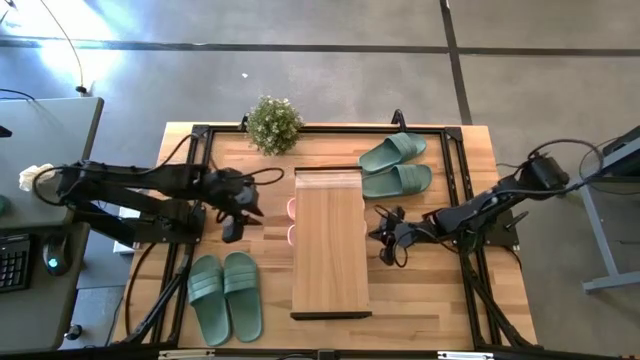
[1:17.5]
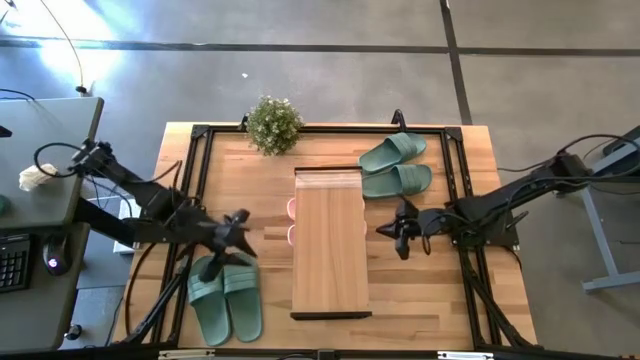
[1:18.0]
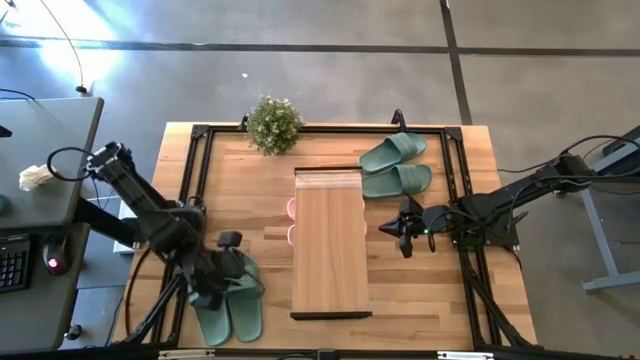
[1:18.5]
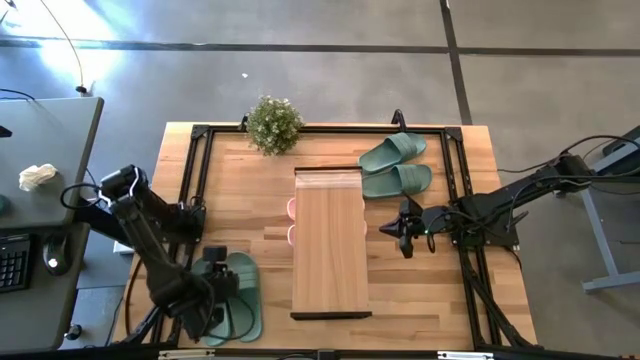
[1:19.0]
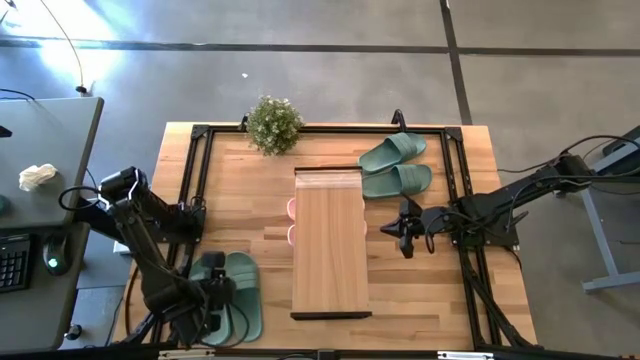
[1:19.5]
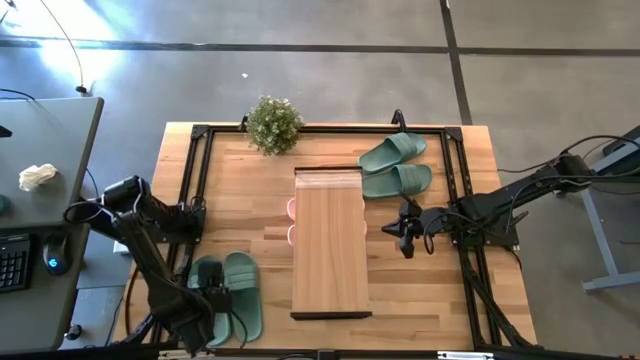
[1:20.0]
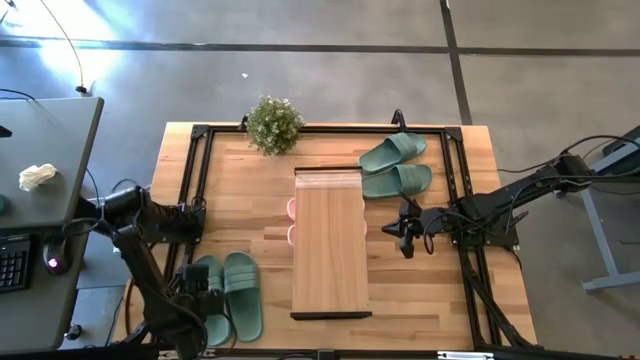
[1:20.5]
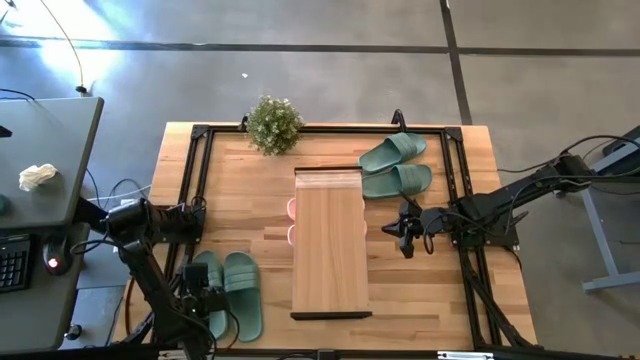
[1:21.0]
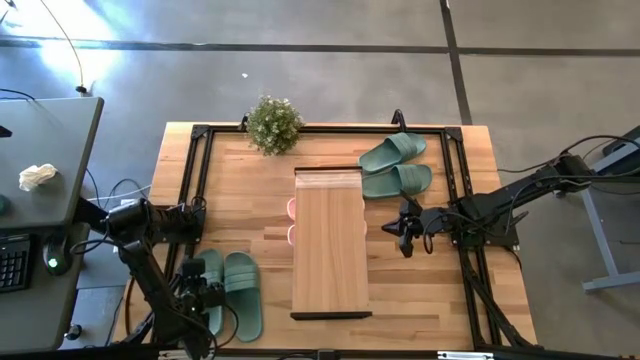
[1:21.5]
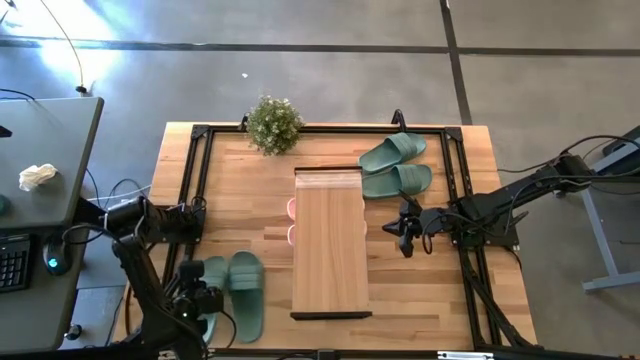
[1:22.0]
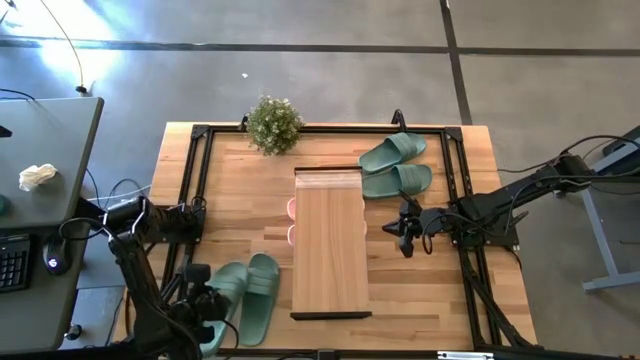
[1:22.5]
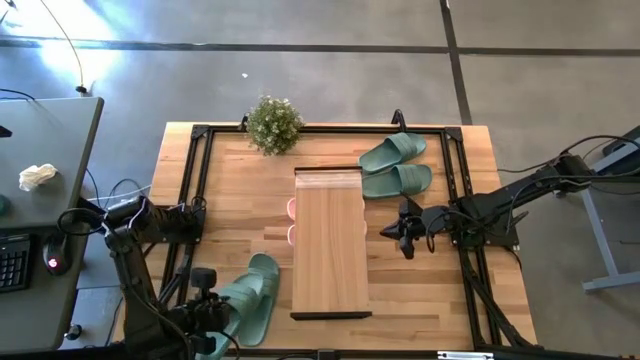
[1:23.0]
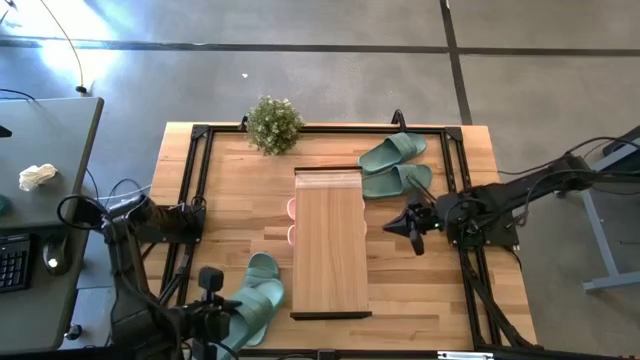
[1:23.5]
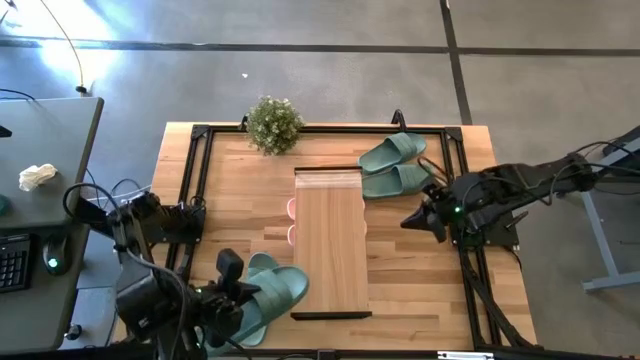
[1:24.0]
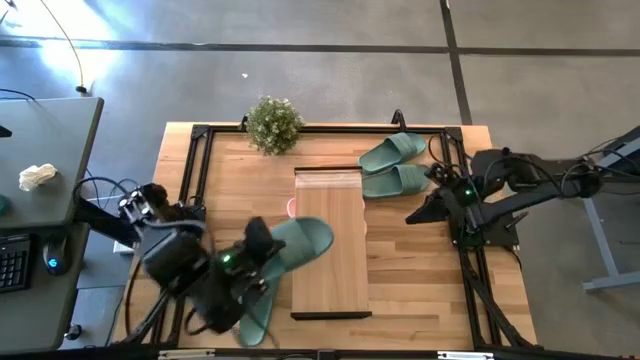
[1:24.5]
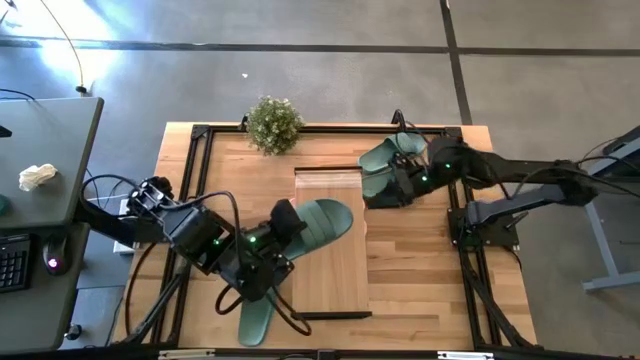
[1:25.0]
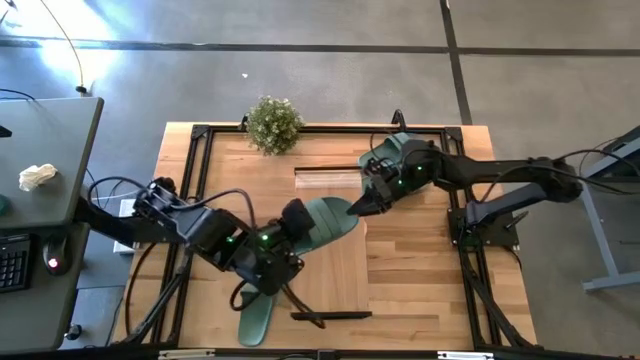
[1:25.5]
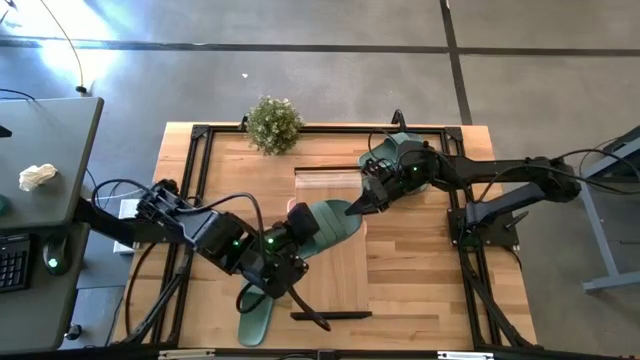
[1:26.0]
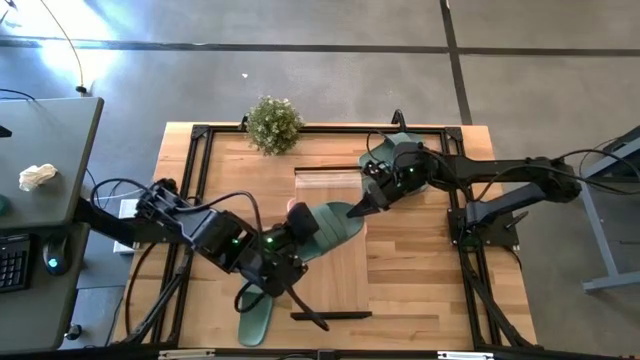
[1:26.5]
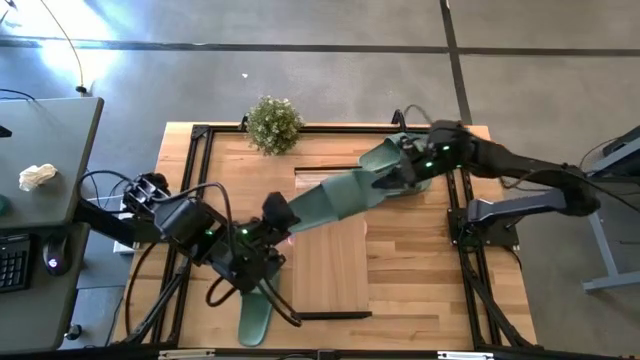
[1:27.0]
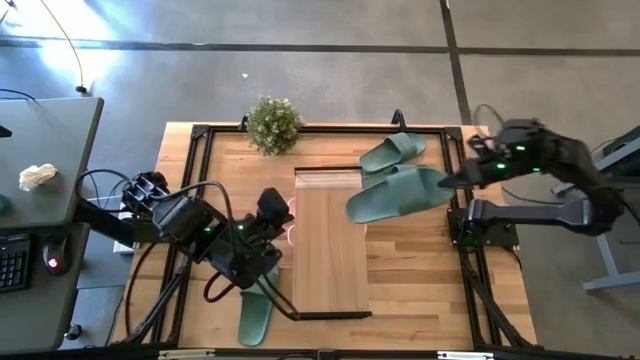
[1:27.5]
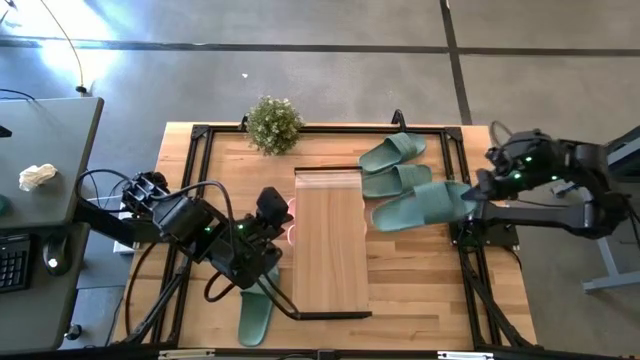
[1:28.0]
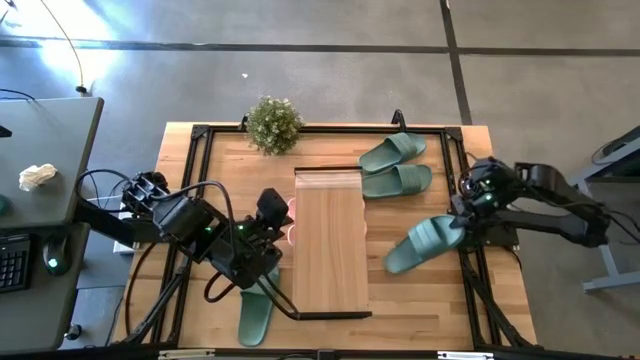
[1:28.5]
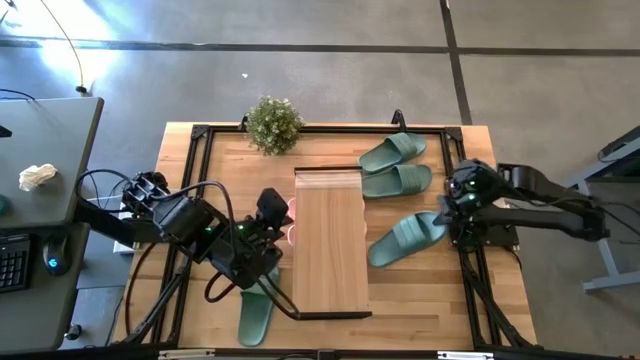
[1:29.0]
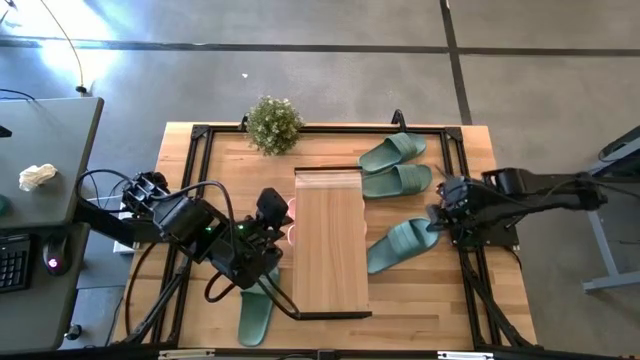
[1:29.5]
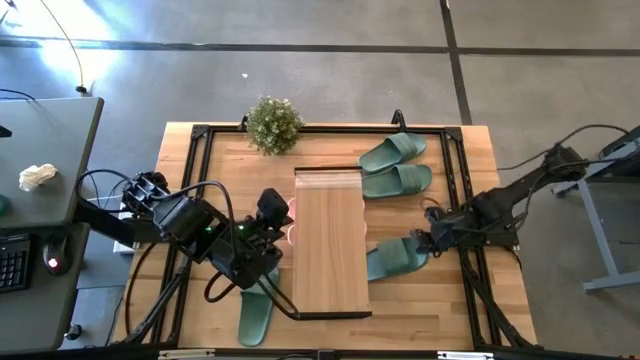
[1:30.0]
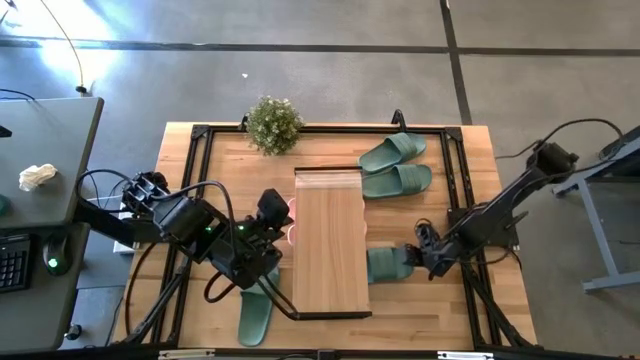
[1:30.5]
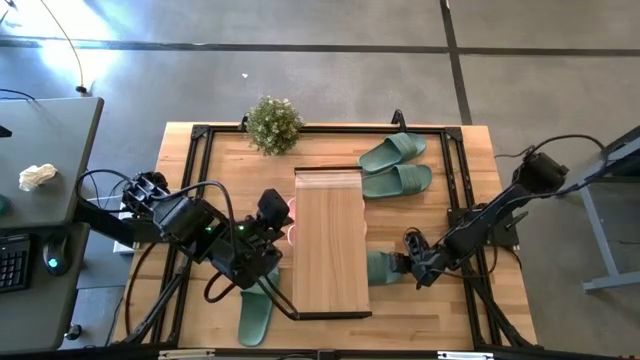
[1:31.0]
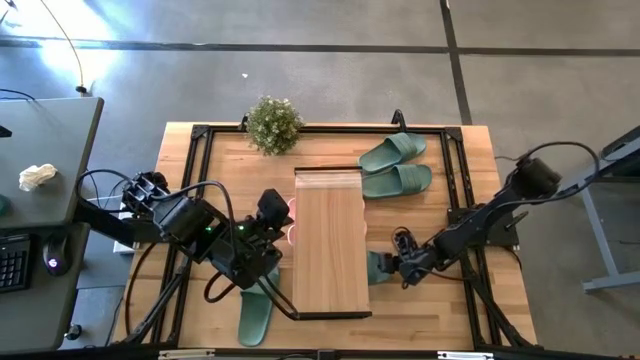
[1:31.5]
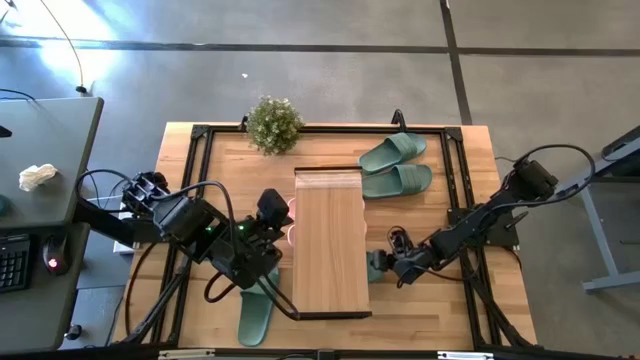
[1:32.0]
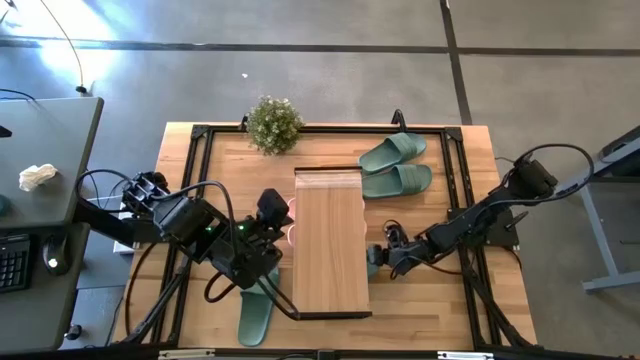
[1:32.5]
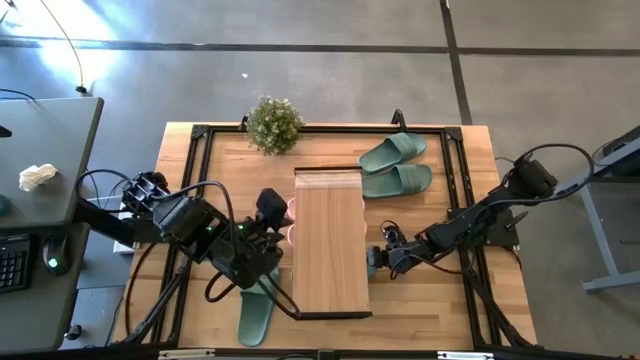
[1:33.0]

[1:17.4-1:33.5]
Task: Pick and place slides into the shelf
Put the bottom left green slide under the shelf

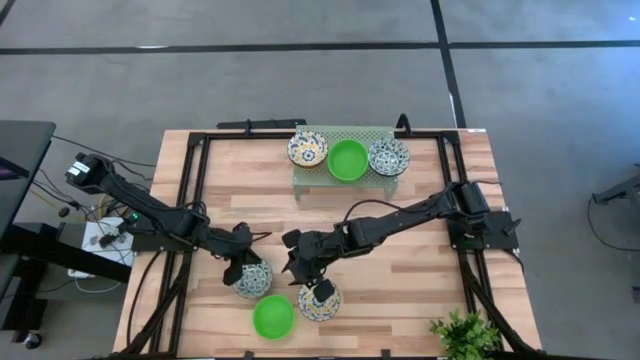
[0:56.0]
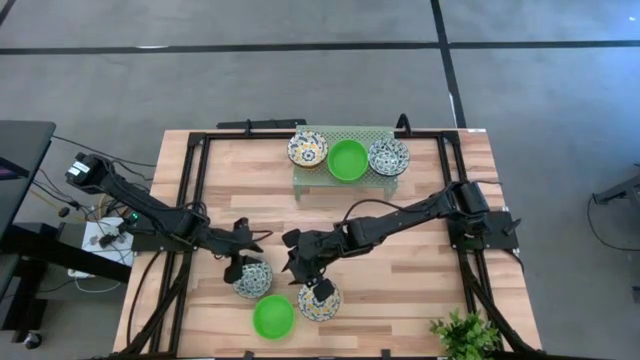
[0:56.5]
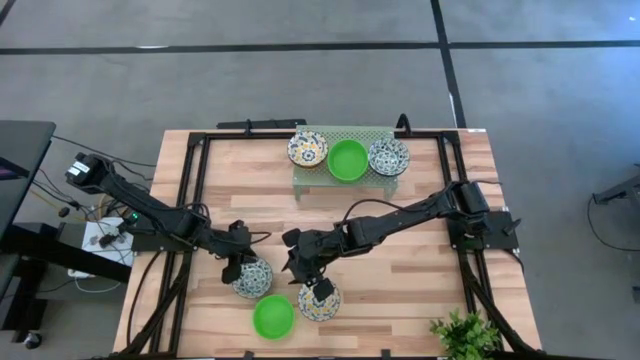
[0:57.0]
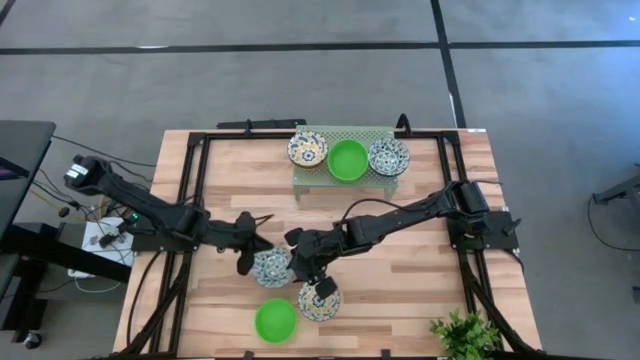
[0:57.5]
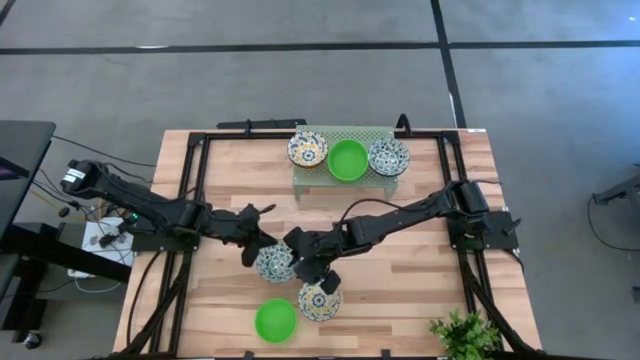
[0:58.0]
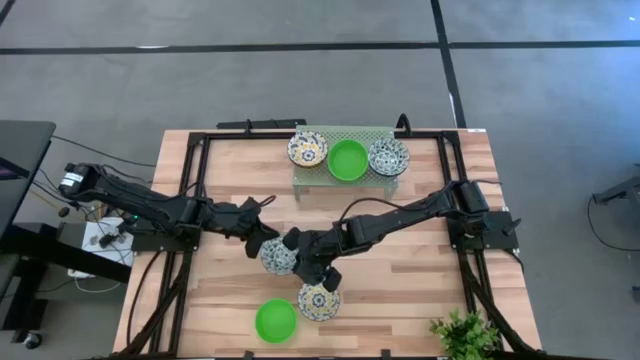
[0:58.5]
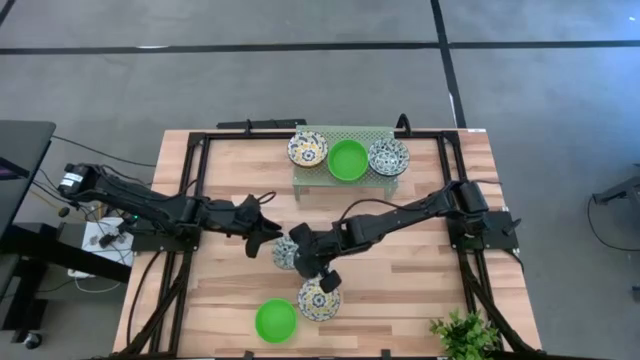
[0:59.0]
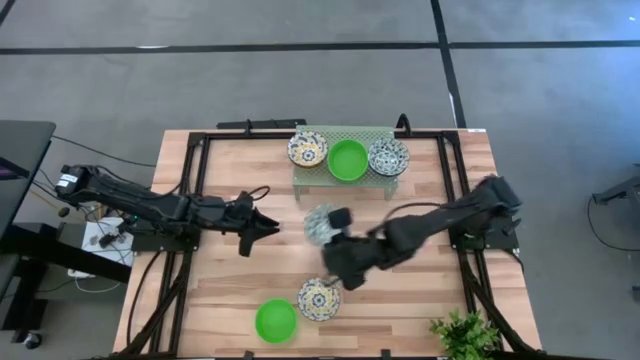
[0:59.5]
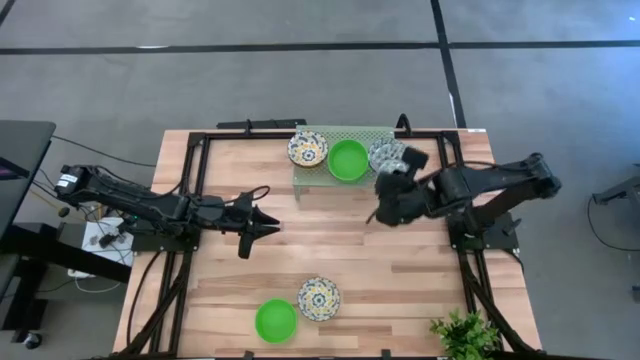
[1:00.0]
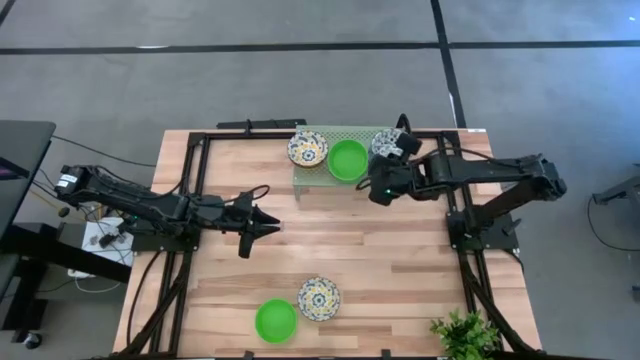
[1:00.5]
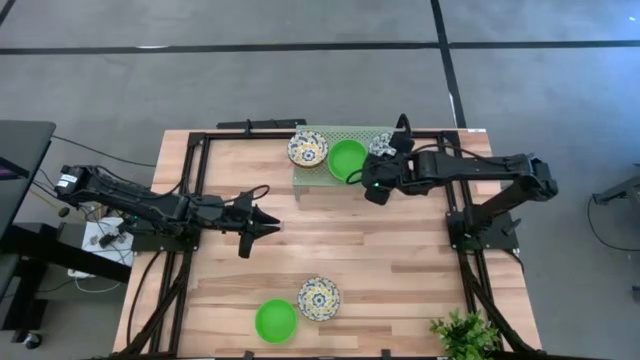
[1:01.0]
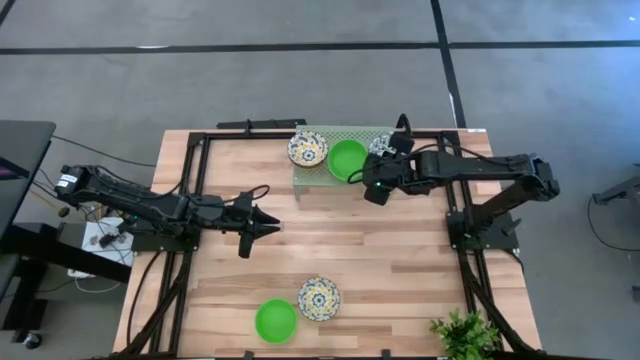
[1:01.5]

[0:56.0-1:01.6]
Task: Pick & Place Mini bowls
Stack the light blue bowl on the light blue bowl on the shelf
